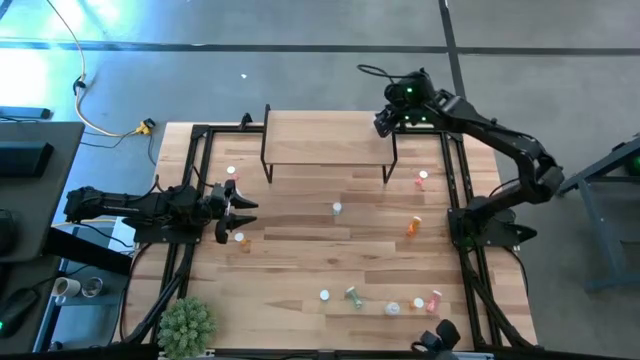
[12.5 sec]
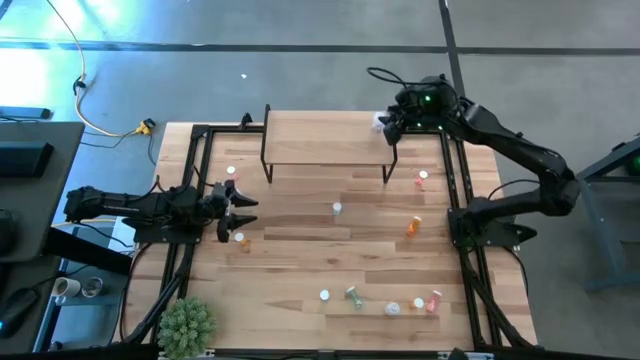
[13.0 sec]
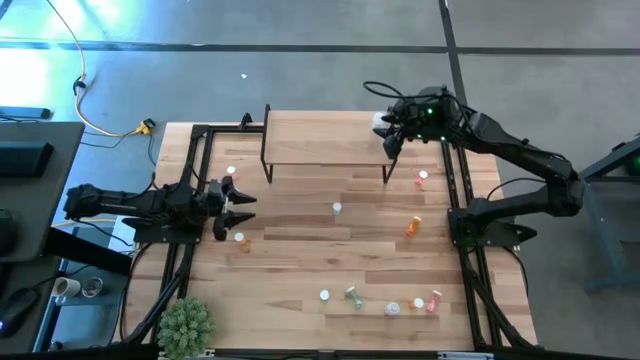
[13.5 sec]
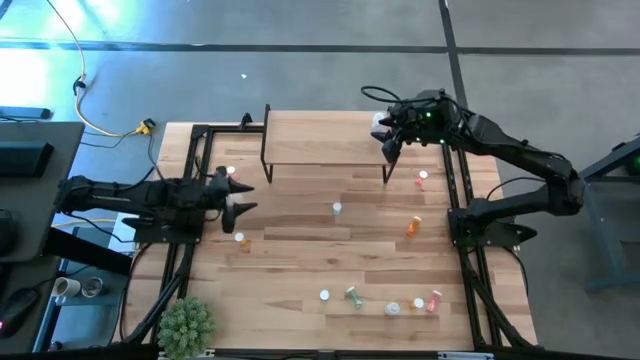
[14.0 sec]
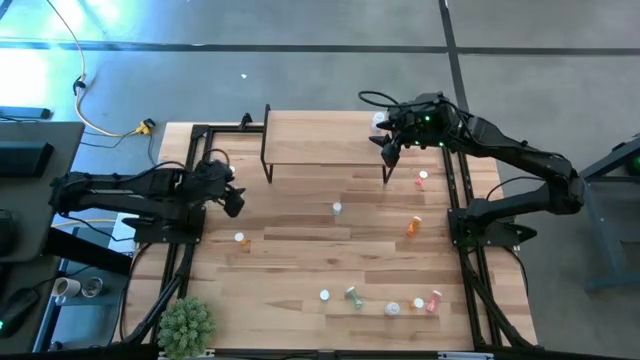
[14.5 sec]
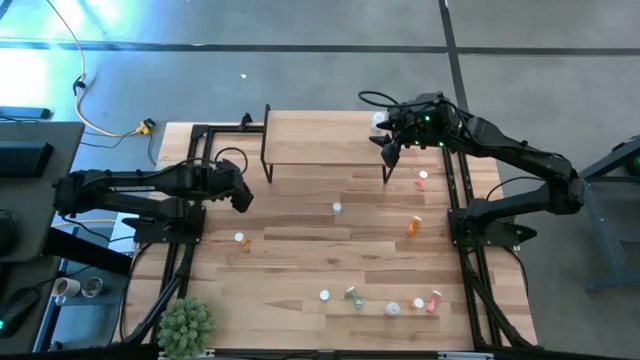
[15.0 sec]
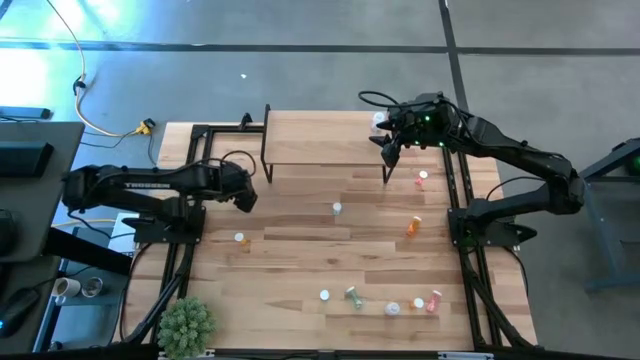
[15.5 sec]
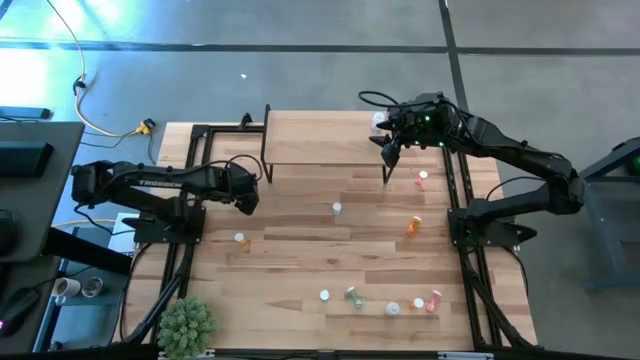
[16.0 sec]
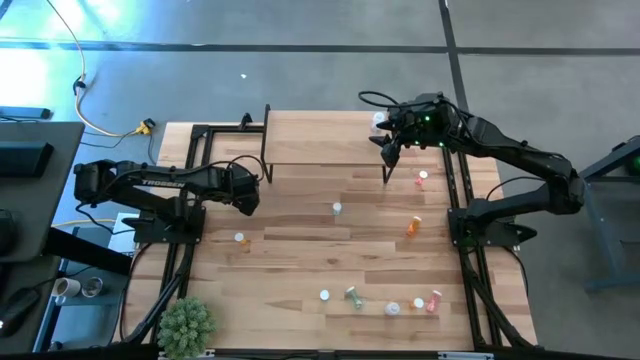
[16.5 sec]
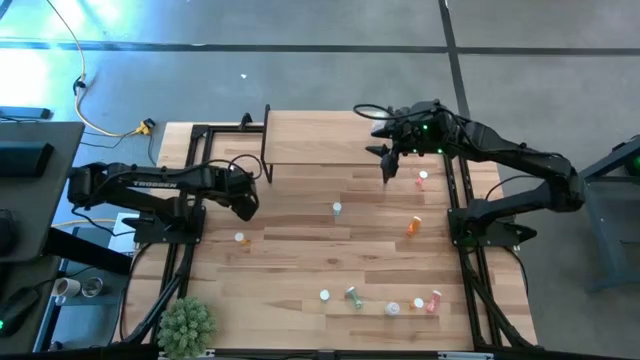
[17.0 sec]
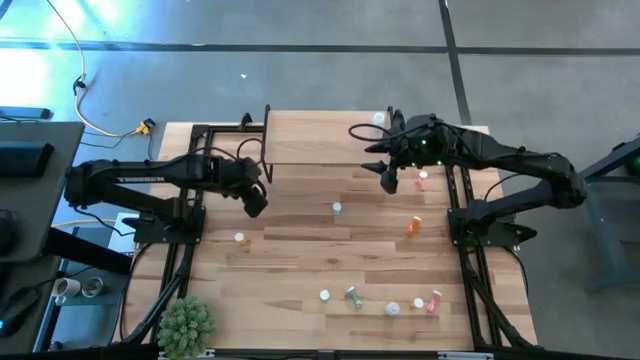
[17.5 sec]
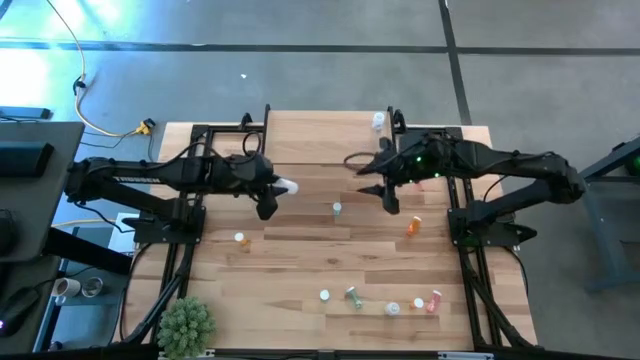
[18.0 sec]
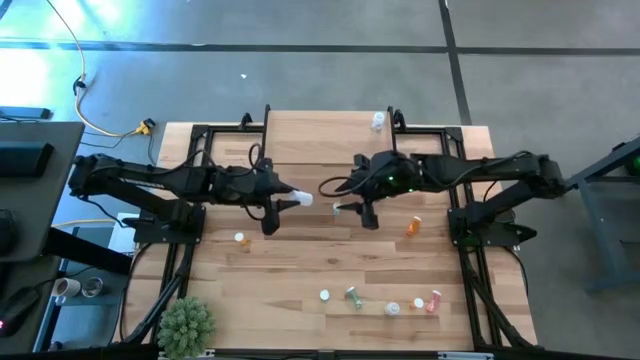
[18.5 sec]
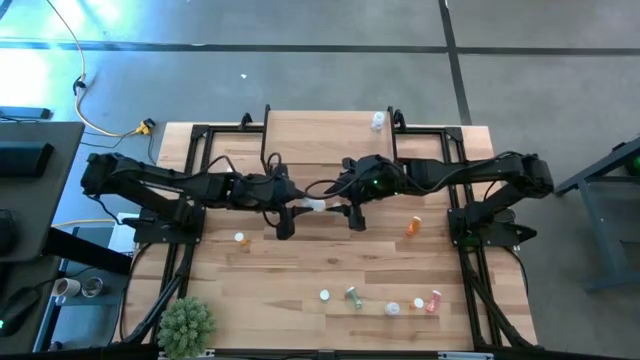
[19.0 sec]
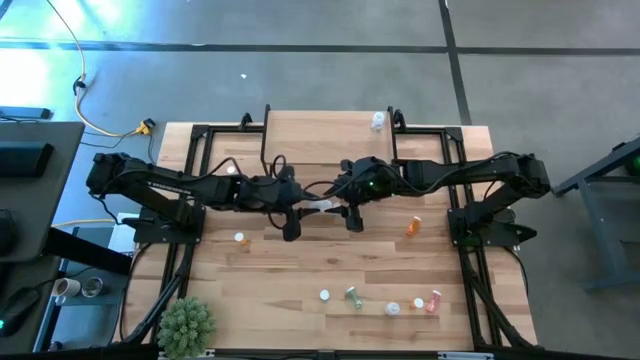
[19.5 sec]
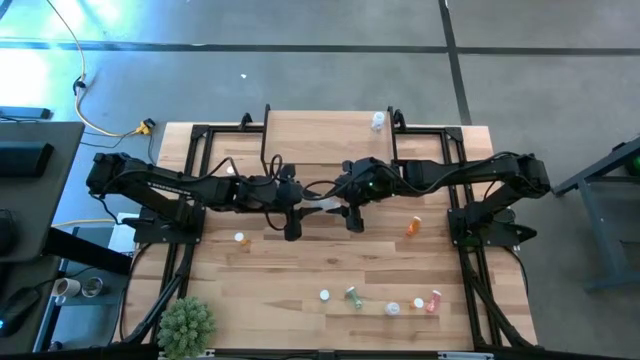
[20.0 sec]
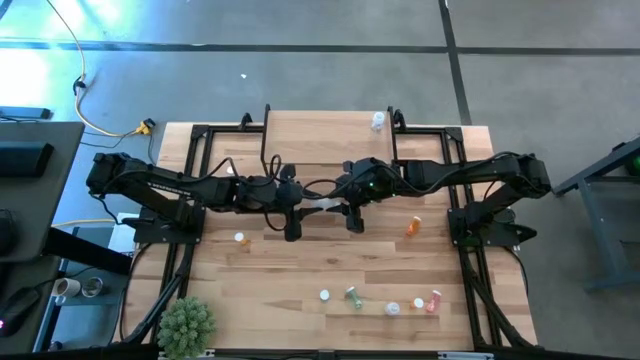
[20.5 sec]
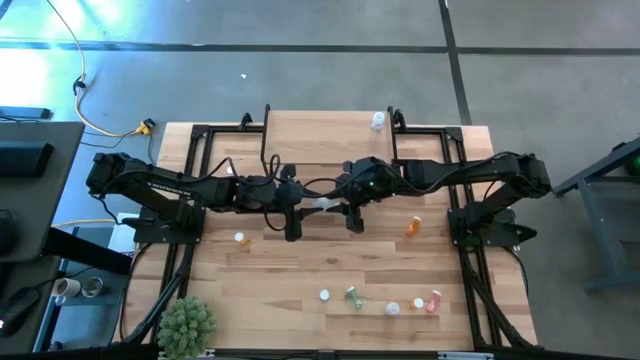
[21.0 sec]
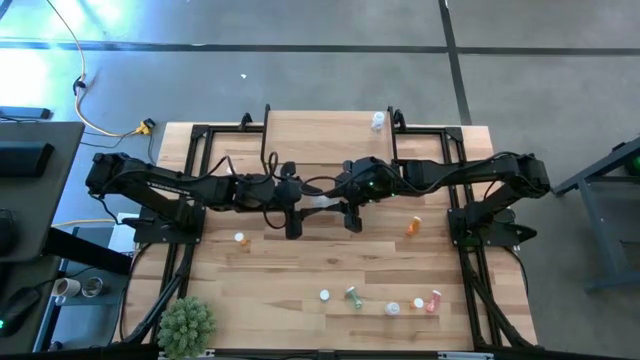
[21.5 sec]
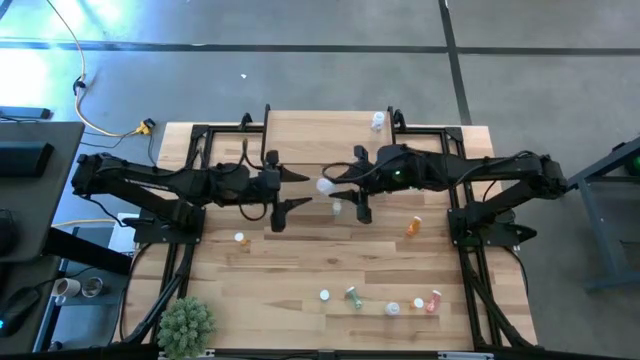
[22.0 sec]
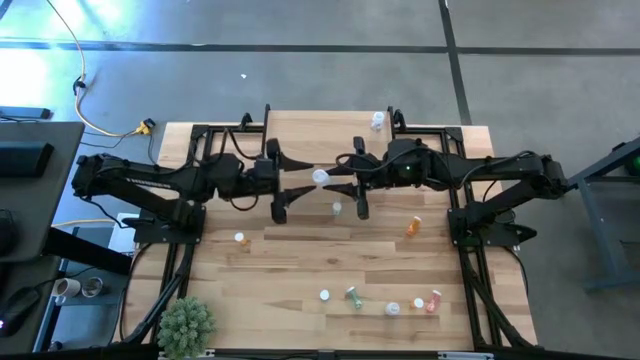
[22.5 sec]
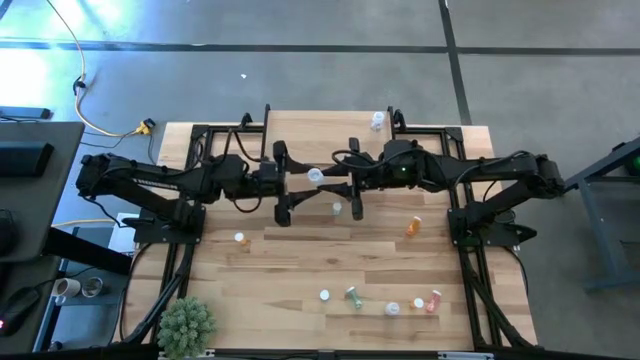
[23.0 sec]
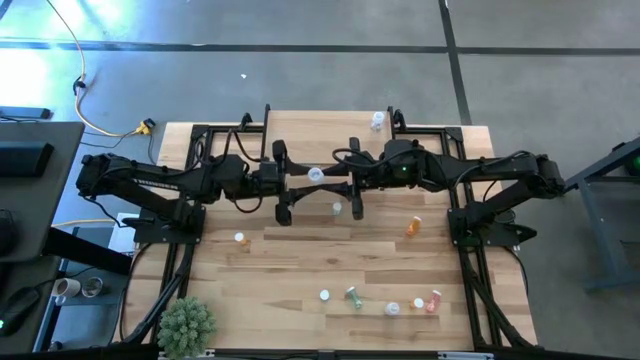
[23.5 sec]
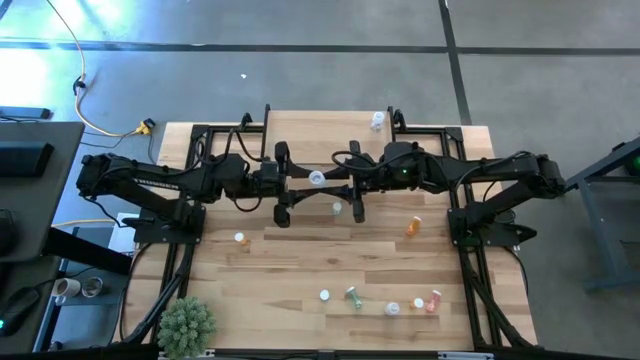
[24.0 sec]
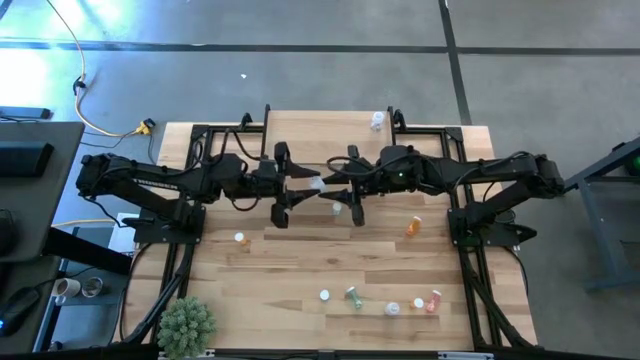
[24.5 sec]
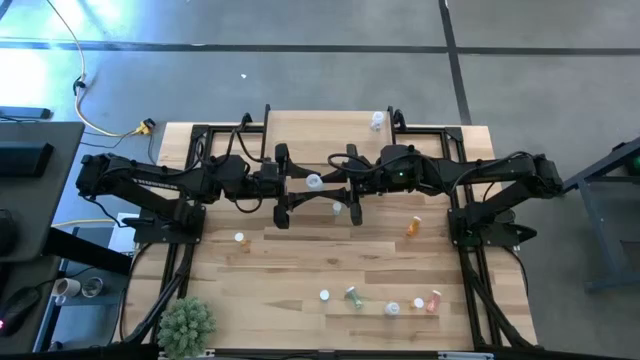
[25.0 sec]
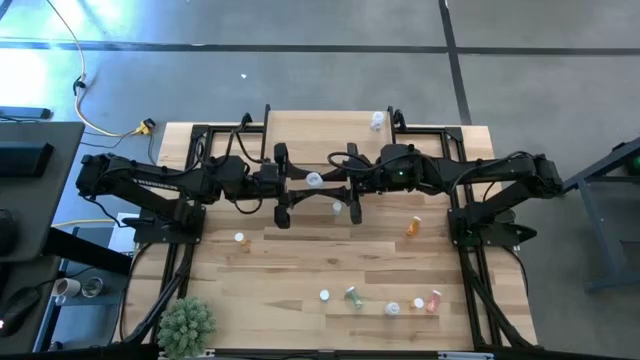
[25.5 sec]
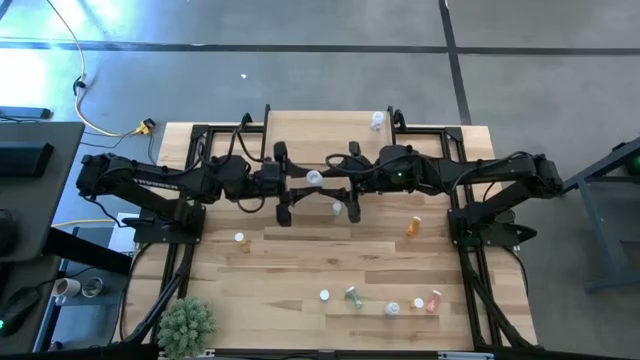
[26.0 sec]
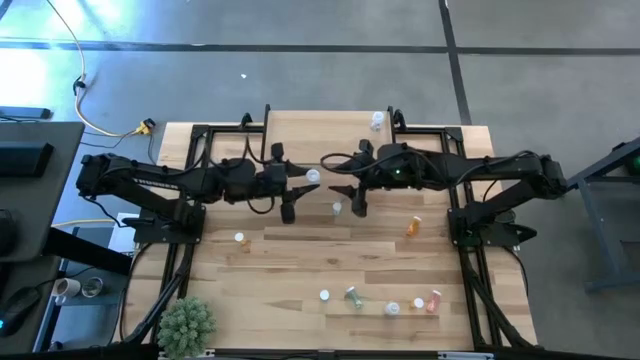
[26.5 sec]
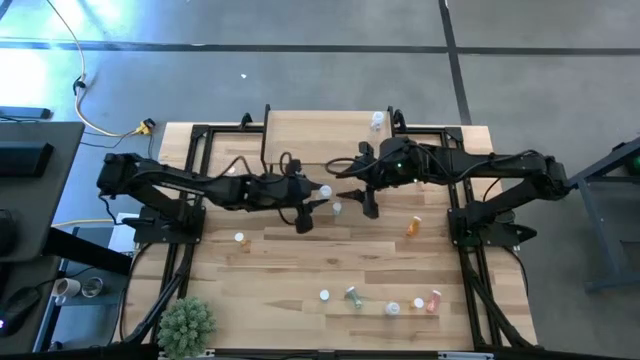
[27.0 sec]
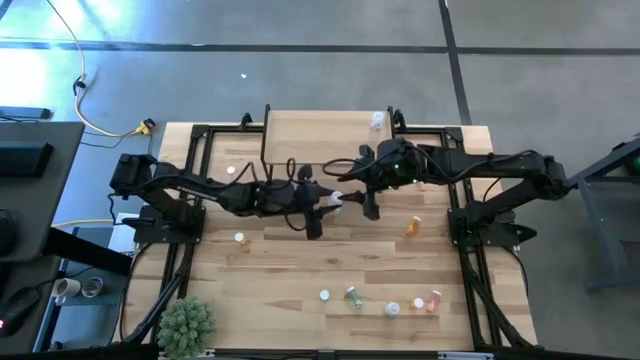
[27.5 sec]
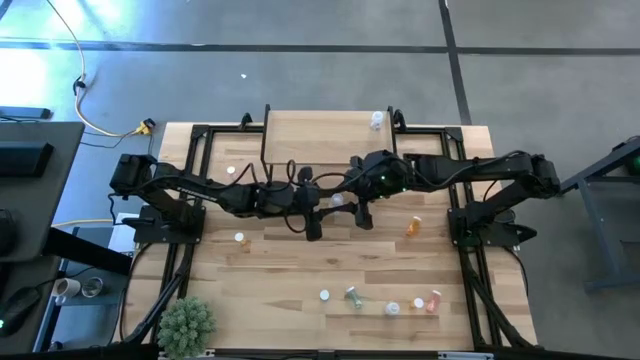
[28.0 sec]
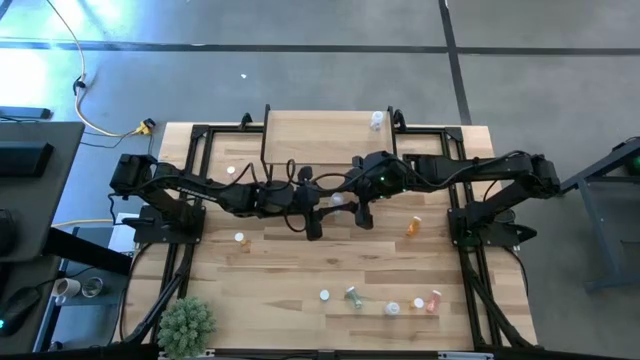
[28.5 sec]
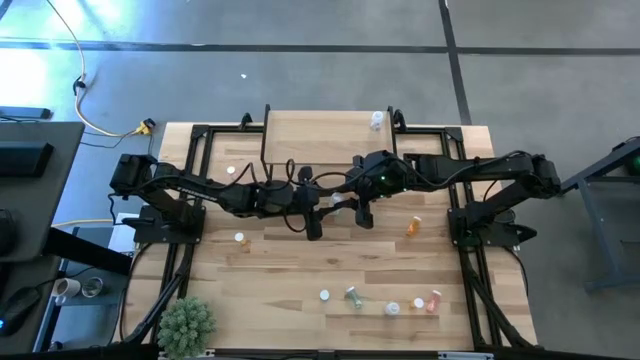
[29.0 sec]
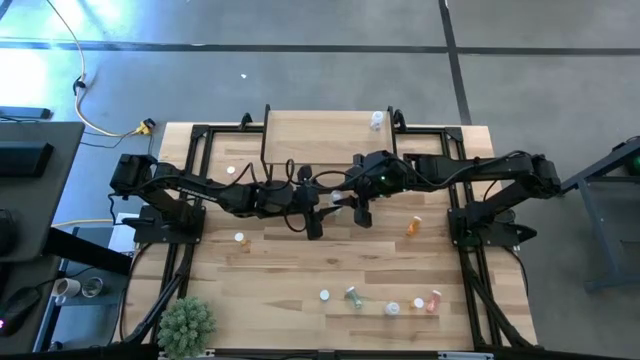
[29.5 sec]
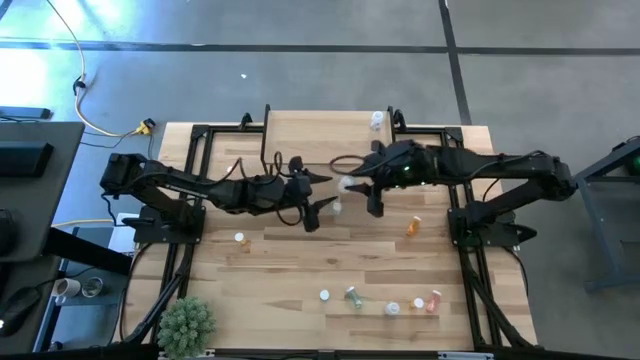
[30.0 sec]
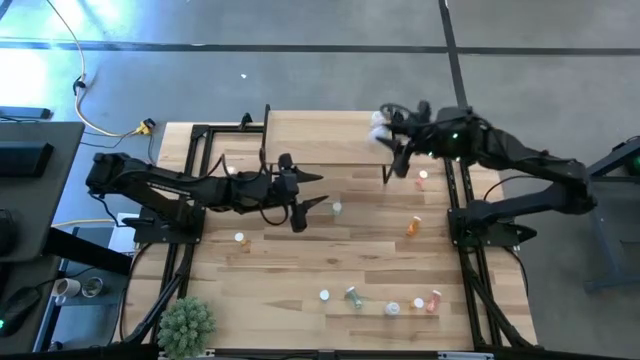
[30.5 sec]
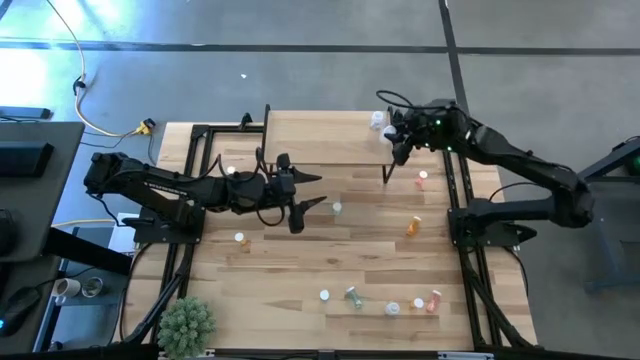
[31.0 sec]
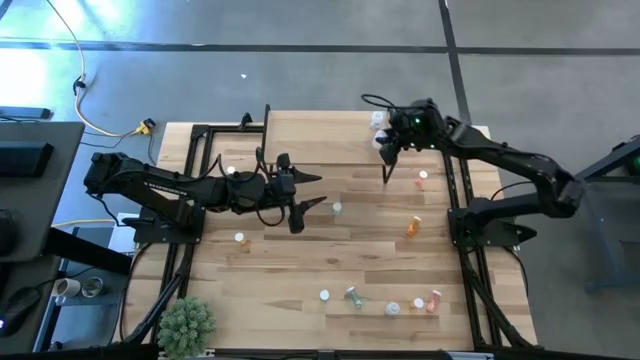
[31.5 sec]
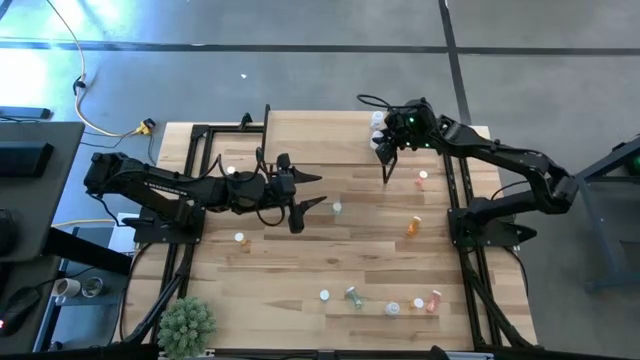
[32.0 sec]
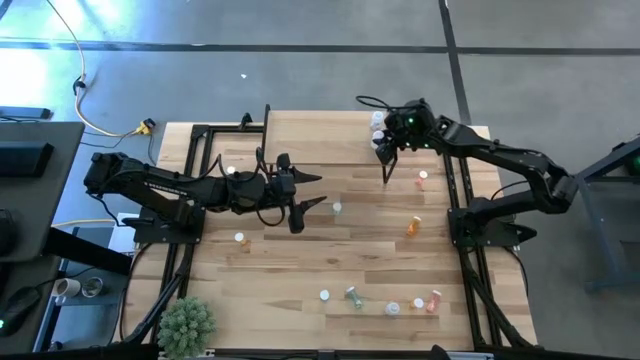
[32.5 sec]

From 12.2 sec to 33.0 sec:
Task: Pick and place medicine bottles onto shelf by color
Put the top transparent pill bottle on the shelf aligned with the transparent pill bottle
